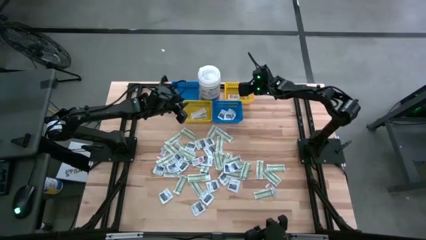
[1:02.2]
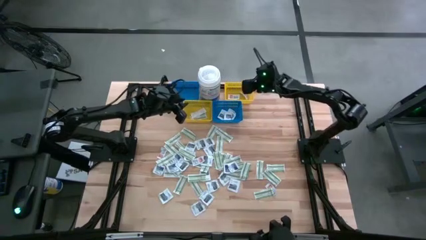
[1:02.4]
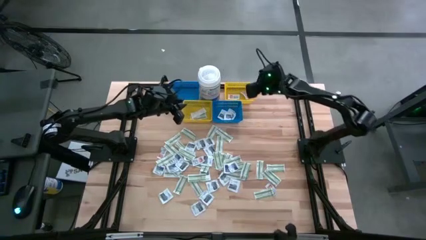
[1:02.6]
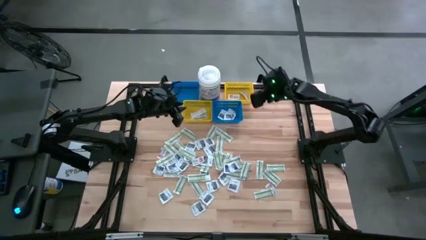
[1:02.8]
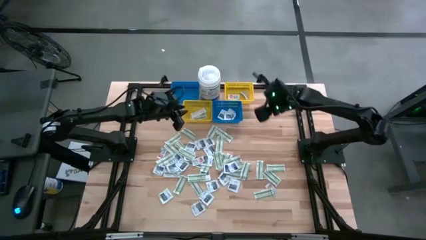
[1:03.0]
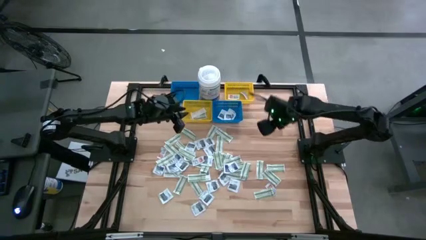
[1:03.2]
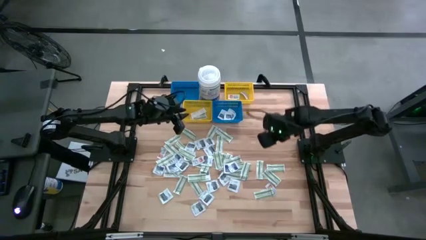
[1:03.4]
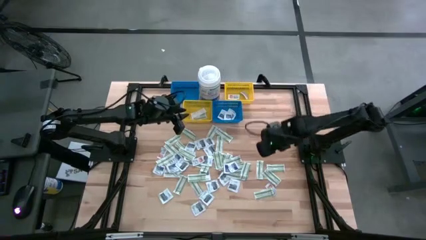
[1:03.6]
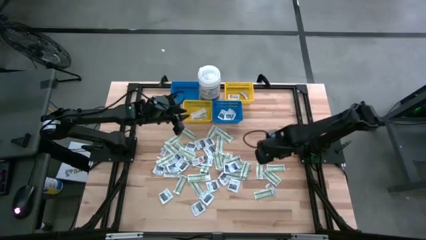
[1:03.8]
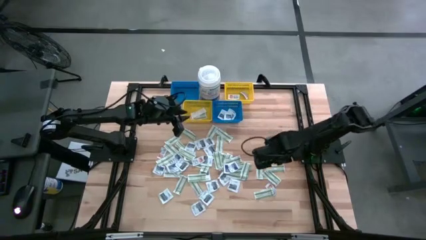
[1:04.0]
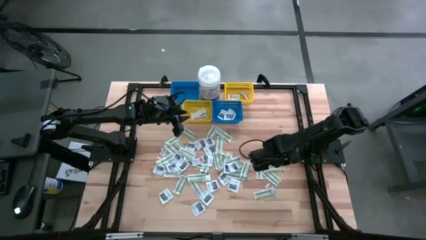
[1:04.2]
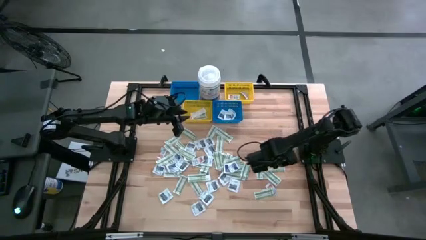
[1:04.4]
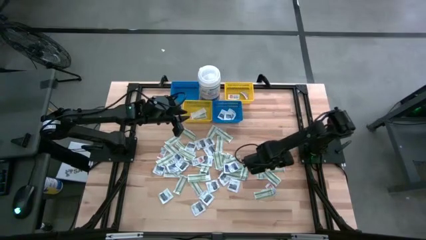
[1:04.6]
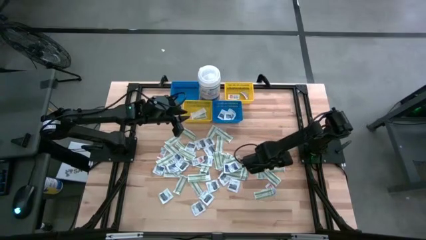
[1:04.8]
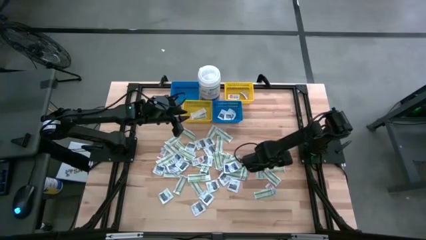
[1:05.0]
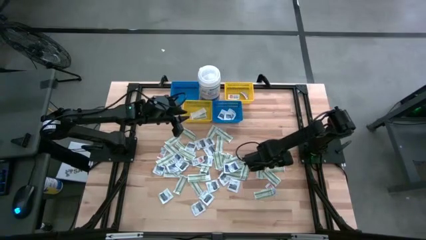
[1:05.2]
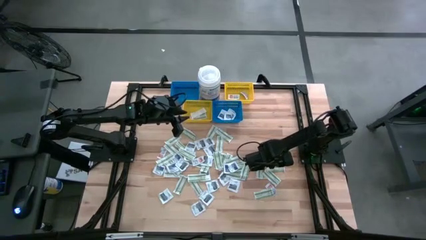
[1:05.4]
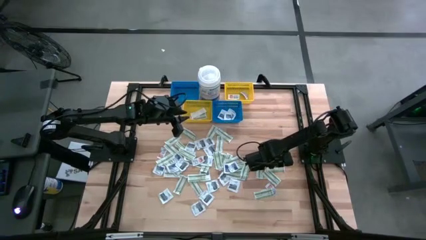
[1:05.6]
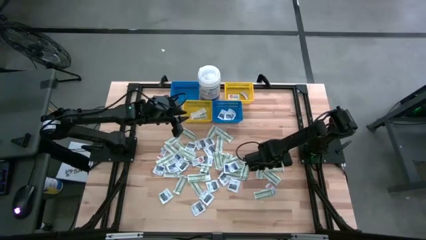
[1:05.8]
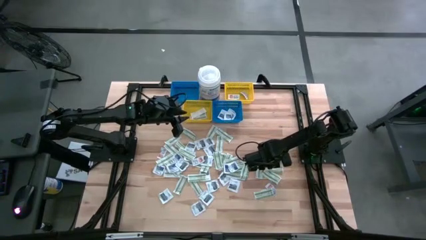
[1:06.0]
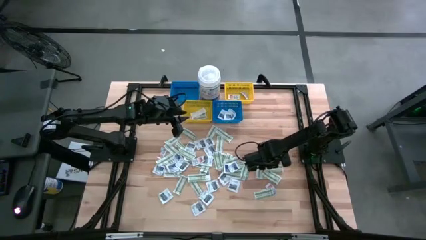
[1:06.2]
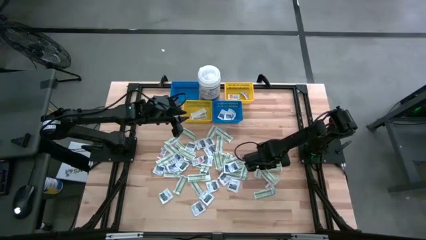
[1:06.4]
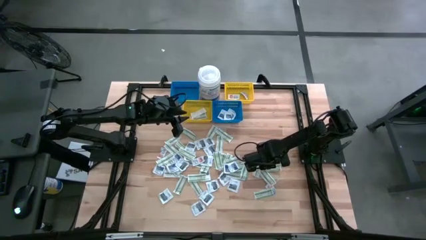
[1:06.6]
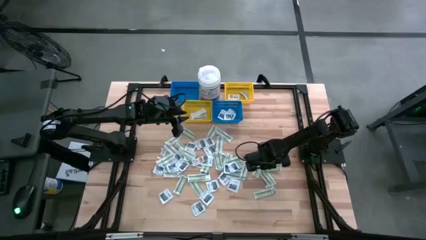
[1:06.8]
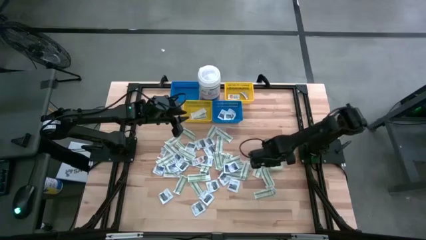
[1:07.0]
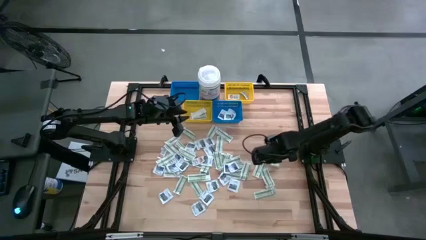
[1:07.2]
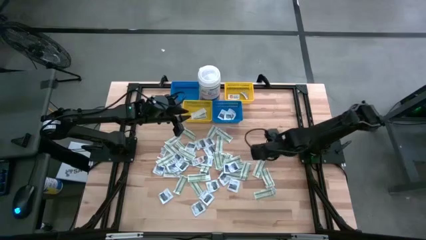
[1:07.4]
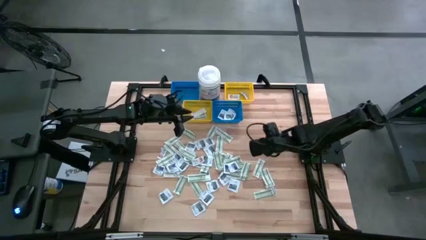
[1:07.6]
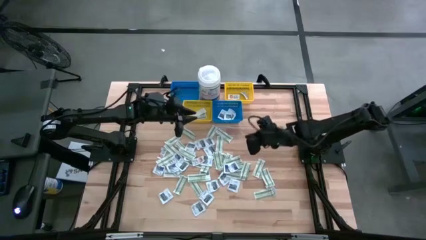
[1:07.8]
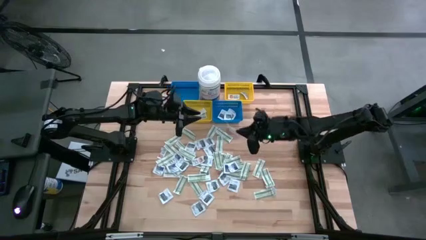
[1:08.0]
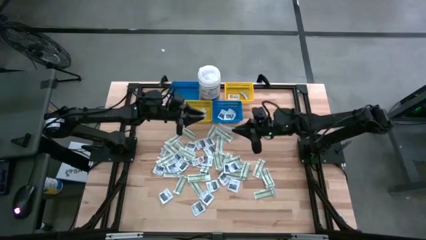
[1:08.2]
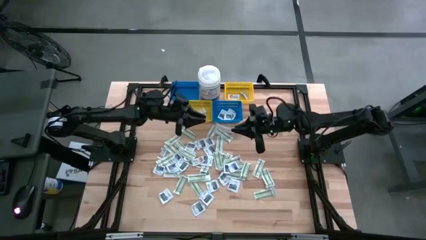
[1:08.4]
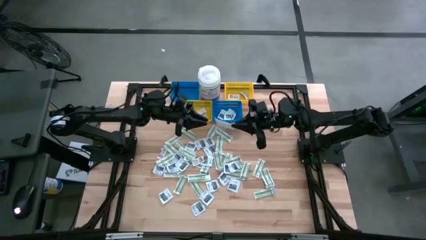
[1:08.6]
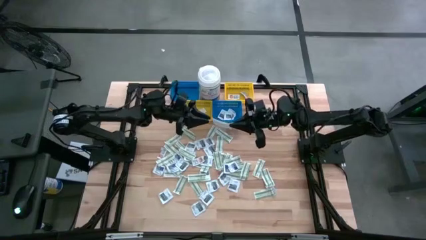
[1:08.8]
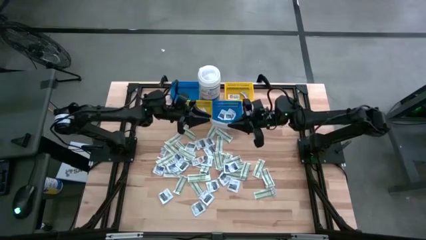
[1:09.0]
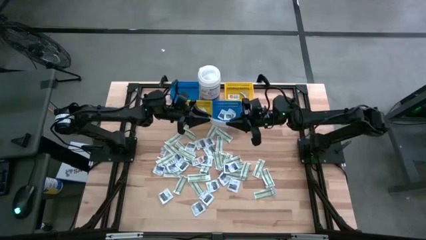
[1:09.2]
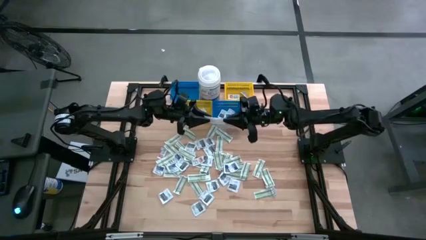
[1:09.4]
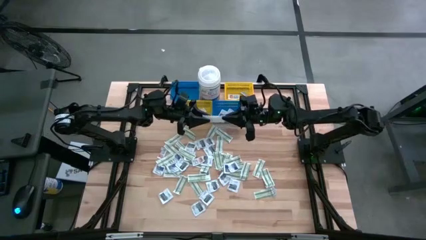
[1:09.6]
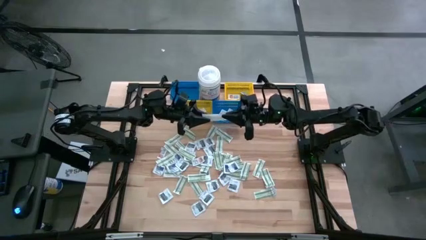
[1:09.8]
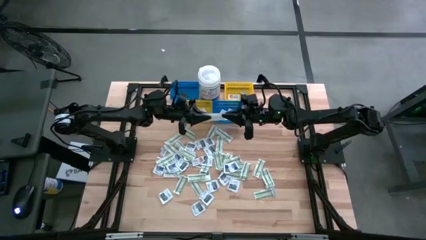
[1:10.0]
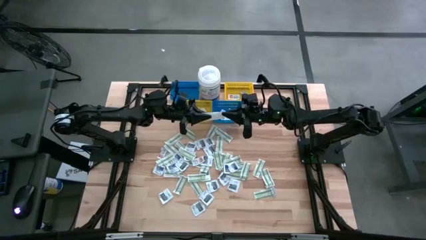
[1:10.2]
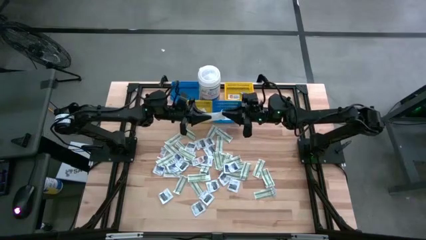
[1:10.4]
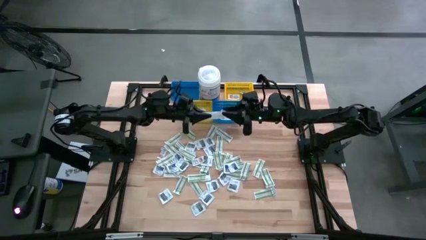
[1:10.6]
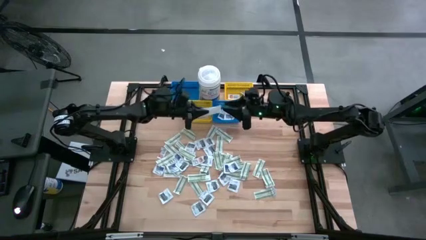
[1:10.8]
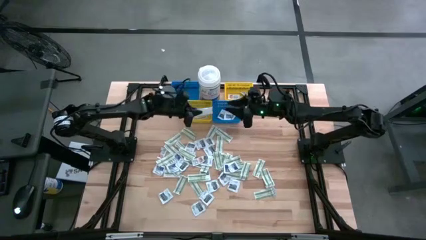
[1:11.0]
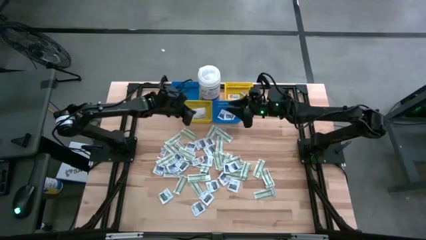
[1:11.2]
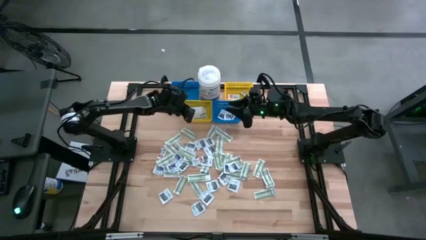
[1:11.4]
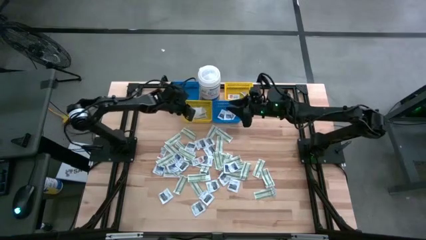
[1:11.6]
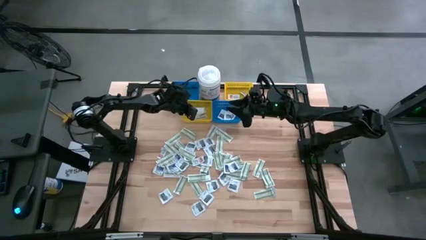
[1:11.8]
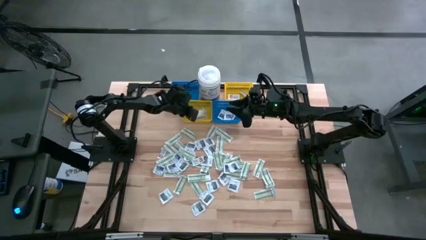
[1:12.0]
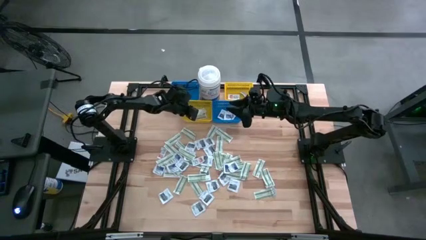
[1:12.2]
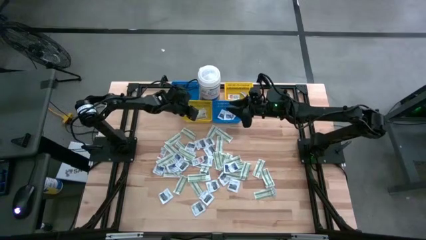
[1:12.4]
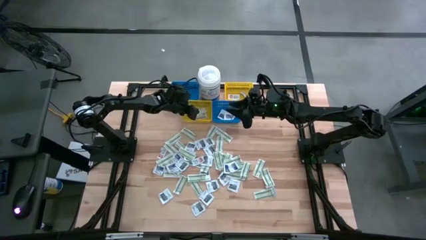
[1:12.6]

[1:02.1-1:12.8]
Task: Pick & Place First Aid Supplies
Put the green bandage pad into the left yellow bin

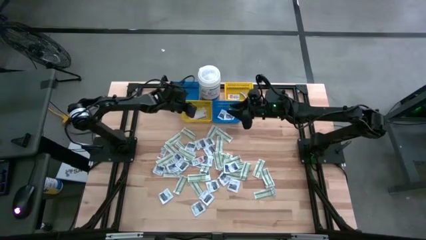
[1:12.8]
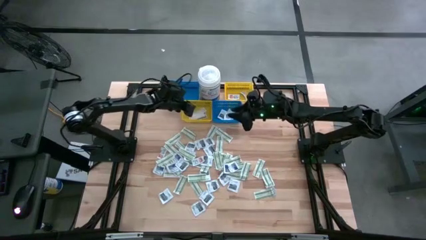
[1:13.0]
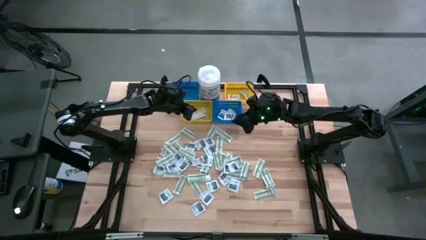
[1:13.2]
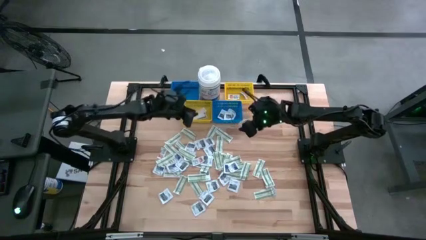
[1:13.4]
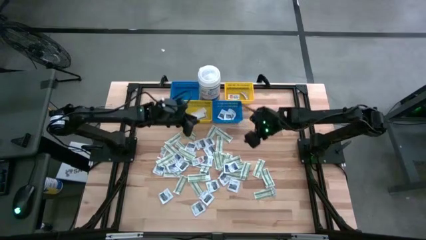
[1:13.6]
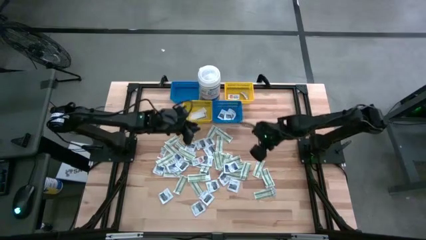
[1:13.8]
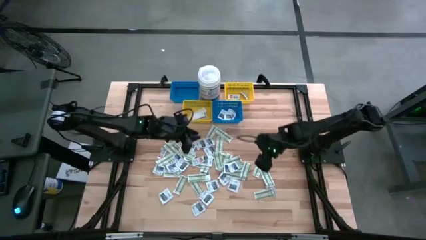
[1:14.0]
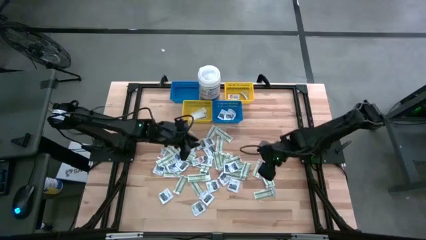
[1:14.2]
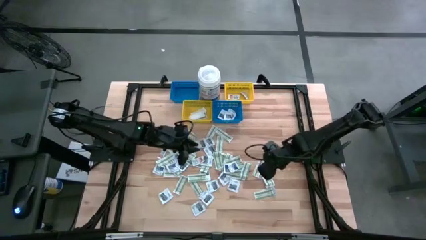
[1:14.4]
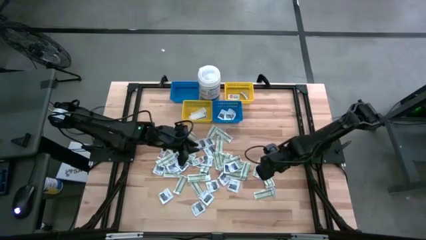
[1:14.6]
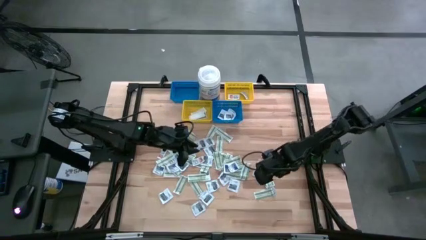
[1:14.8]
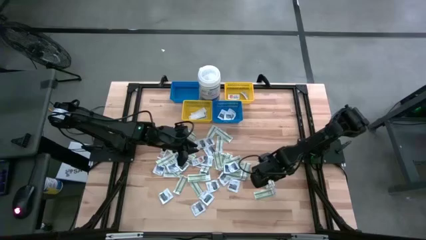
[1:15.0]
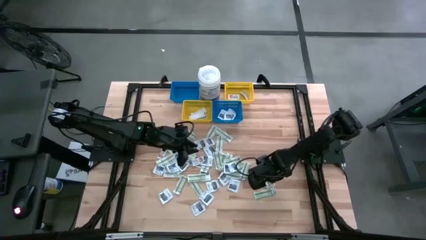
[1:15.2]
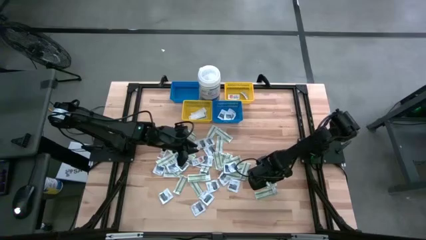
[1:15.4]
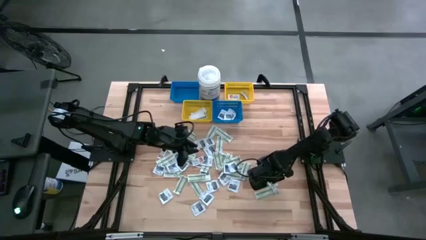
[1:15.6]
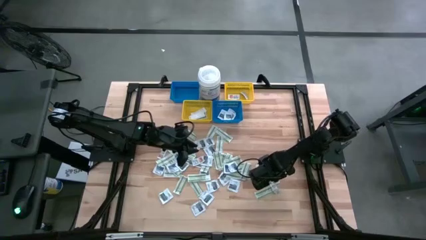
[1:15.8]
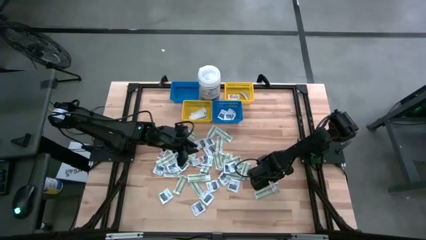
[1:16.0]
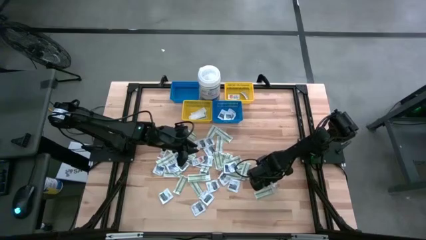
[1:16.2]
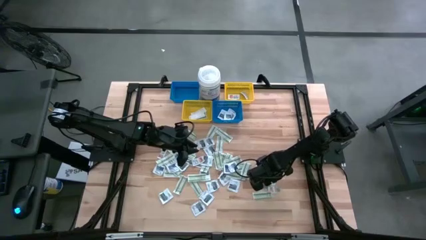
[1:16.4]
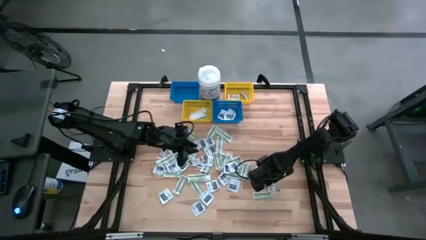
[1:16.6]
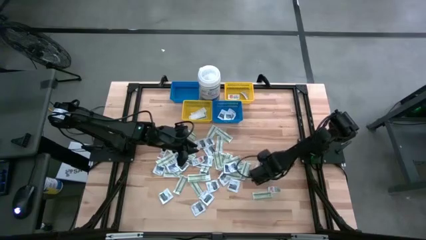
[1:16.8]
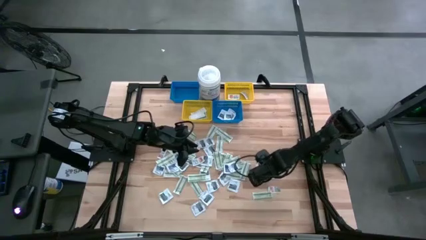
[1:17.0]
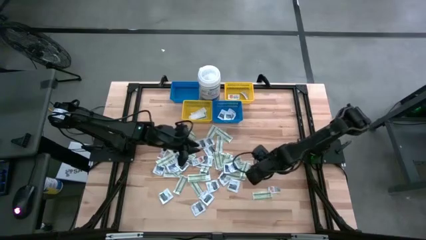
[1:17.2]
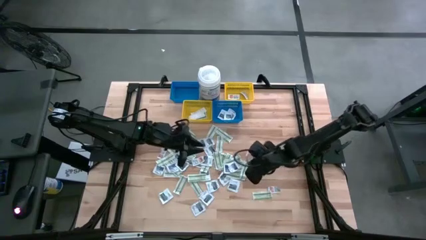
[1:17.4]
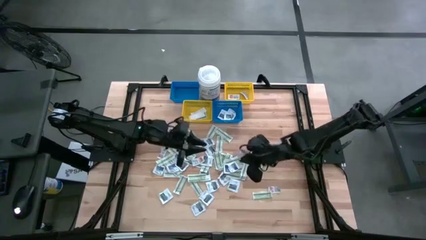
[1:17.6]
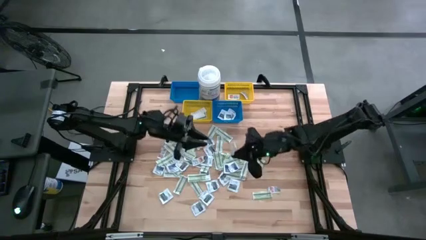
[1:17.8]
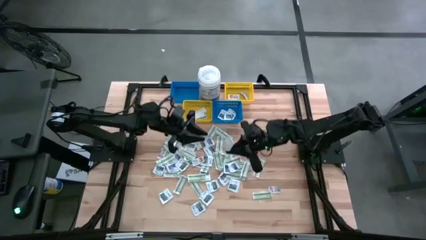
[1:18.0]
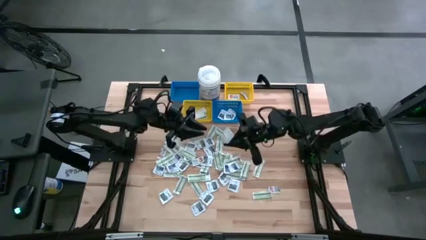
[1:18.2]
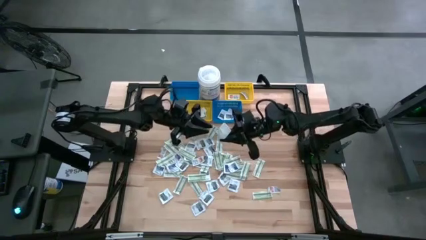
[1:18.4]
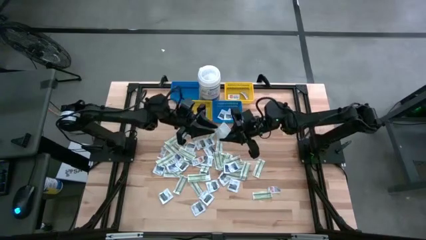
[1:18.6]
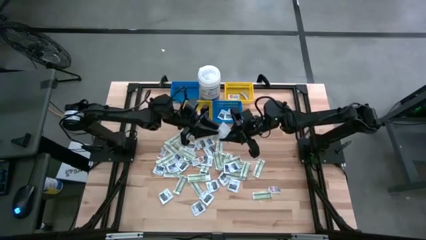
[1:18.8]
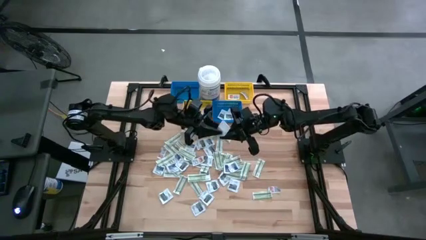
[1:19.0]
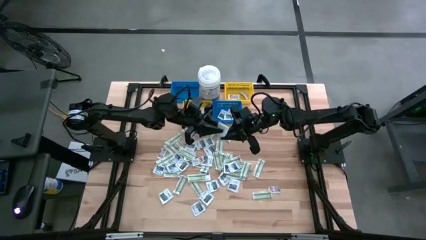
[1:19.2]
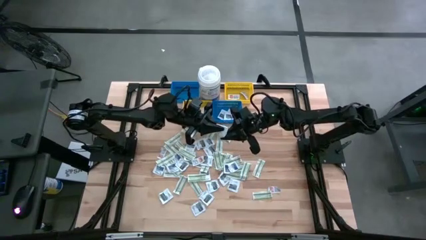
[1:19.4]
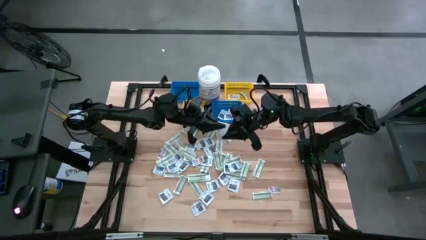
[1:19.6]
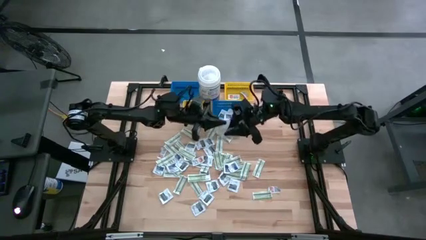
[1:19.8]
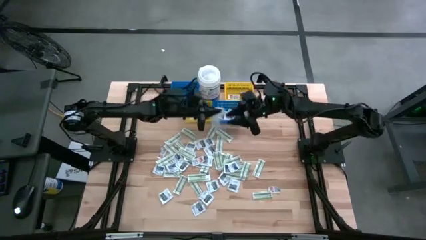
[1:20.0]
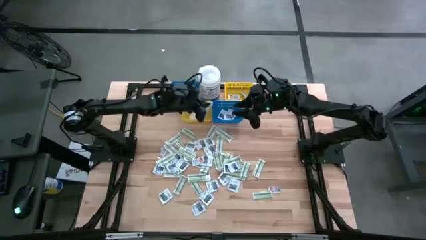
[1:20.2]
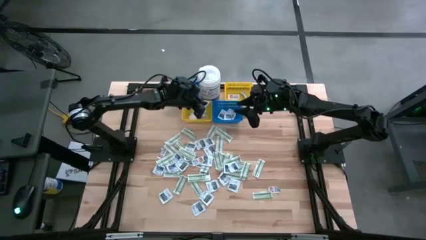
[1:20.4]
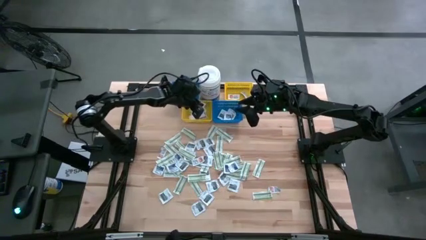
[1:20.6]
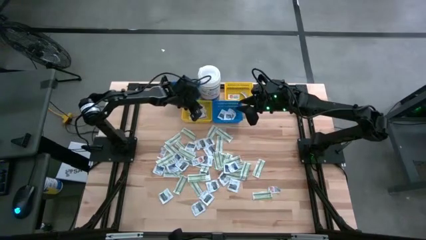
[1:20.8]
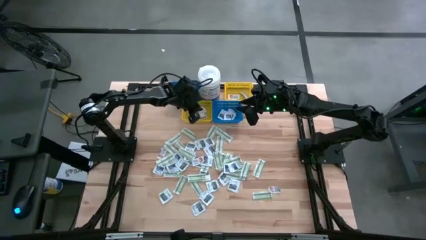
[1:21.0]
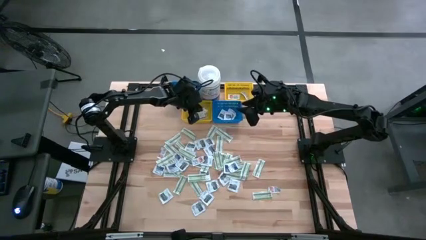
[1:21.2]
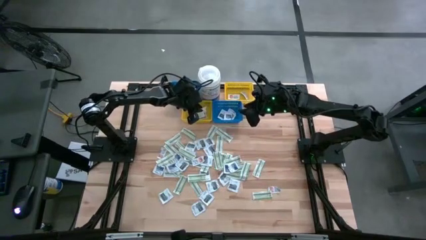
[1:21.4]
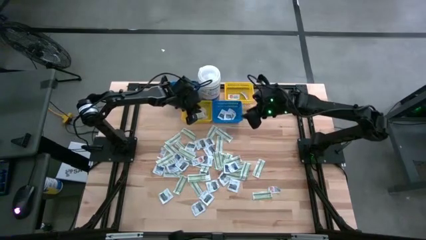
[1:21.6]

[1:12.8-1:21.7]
Put the green bandage pad into the left yellow bin
